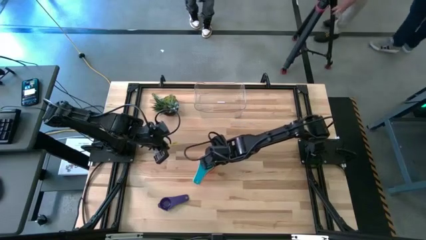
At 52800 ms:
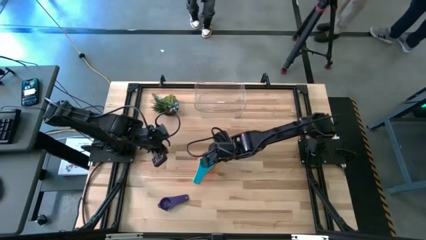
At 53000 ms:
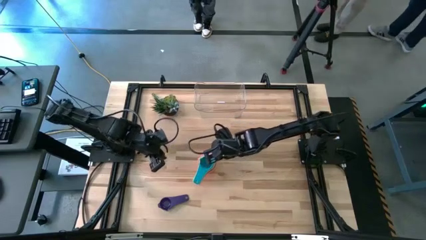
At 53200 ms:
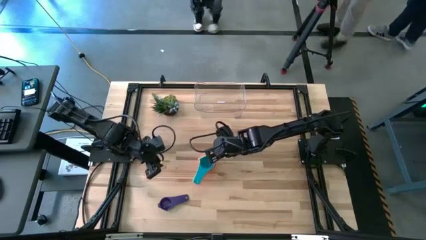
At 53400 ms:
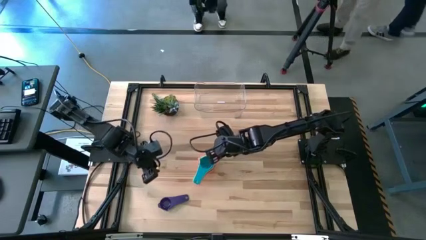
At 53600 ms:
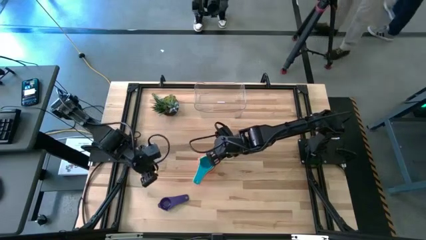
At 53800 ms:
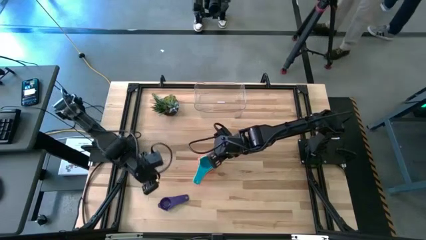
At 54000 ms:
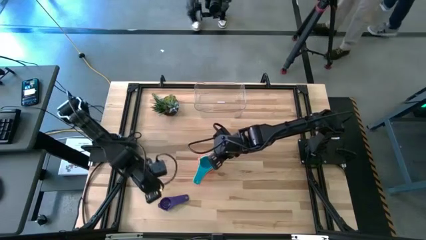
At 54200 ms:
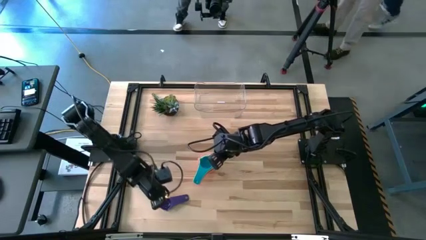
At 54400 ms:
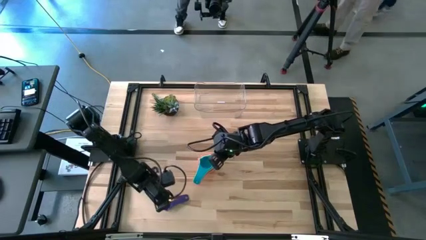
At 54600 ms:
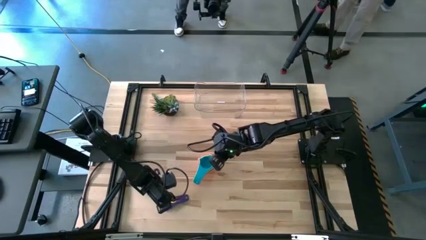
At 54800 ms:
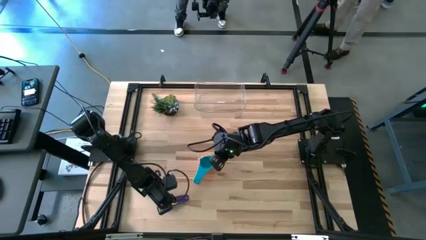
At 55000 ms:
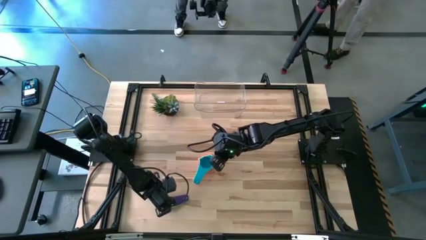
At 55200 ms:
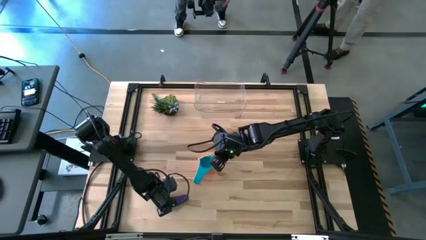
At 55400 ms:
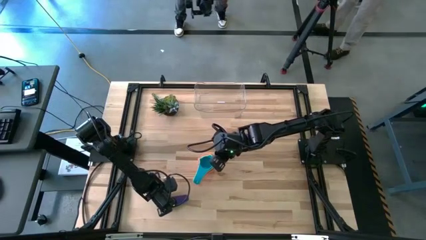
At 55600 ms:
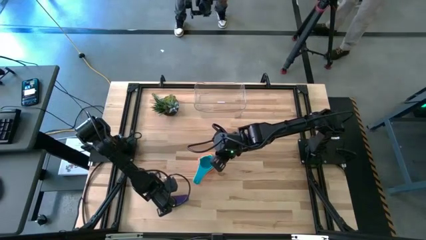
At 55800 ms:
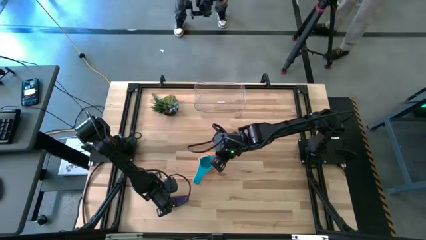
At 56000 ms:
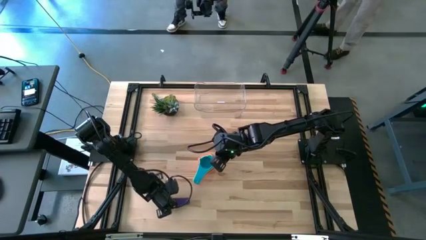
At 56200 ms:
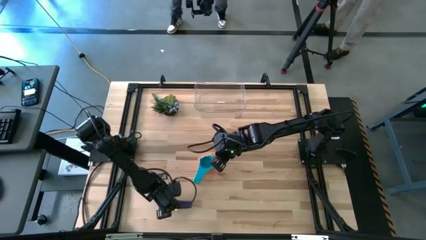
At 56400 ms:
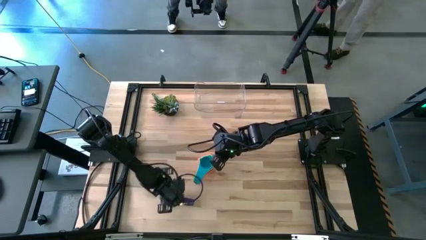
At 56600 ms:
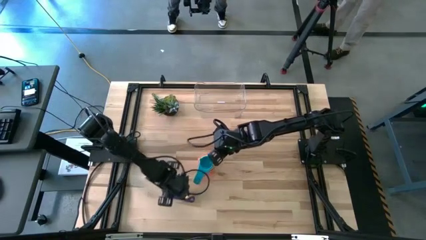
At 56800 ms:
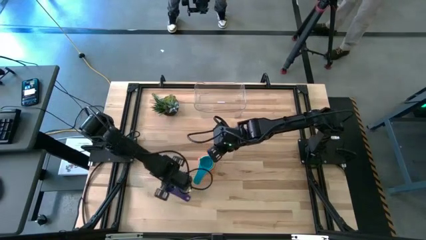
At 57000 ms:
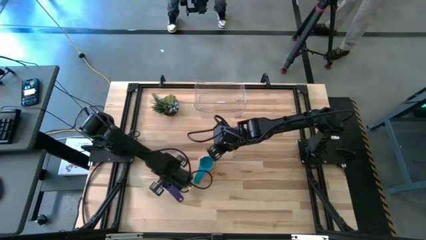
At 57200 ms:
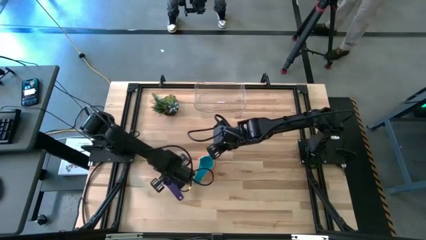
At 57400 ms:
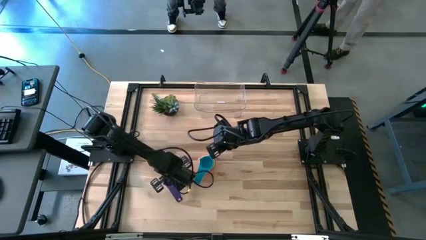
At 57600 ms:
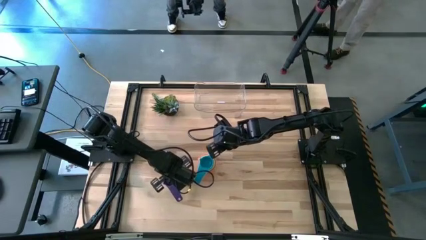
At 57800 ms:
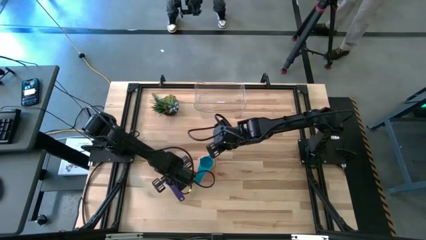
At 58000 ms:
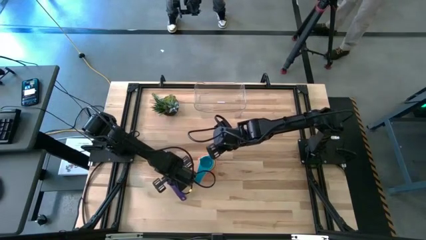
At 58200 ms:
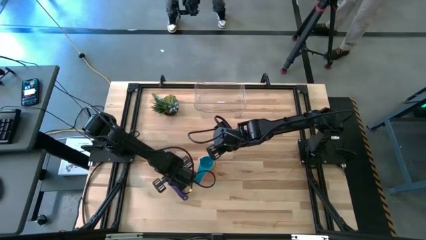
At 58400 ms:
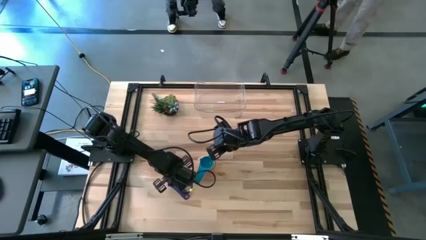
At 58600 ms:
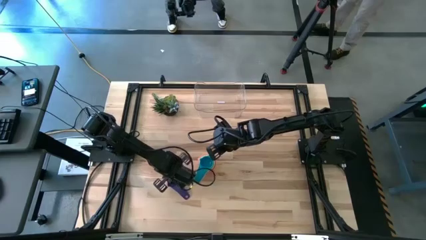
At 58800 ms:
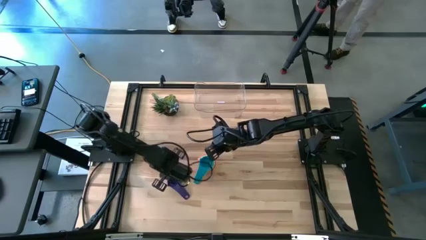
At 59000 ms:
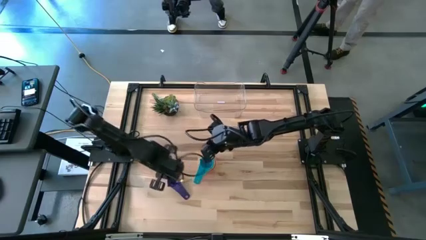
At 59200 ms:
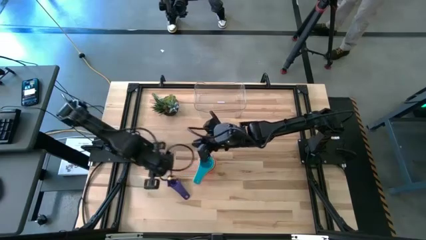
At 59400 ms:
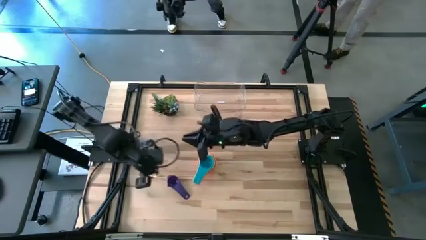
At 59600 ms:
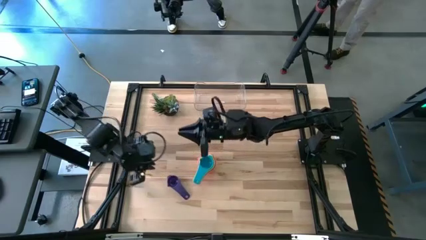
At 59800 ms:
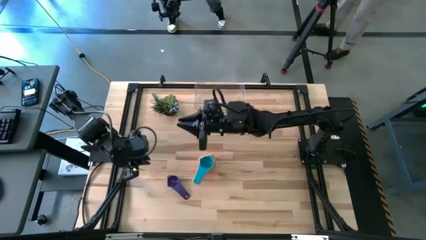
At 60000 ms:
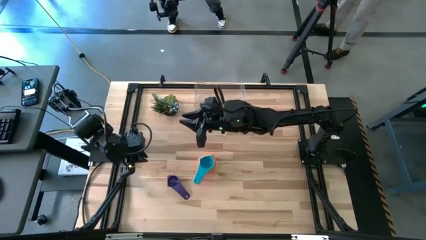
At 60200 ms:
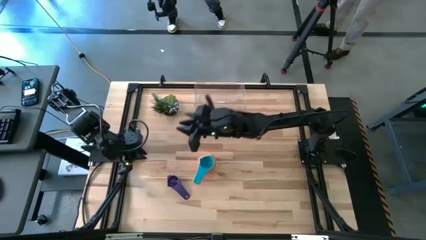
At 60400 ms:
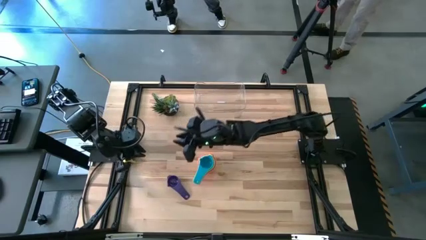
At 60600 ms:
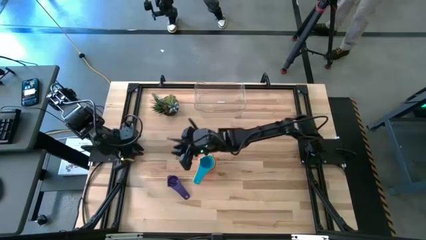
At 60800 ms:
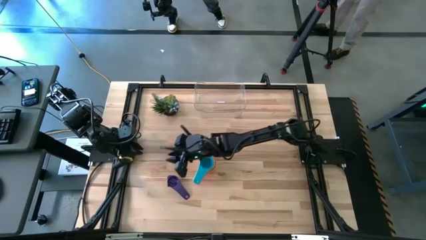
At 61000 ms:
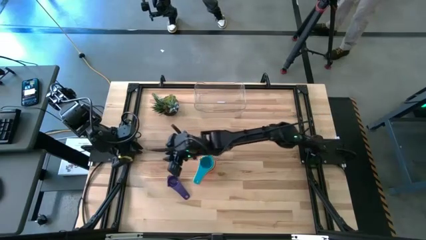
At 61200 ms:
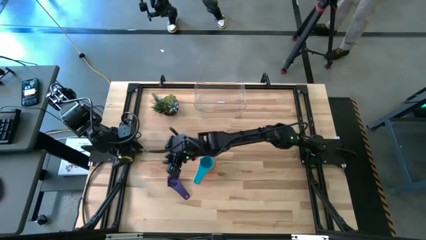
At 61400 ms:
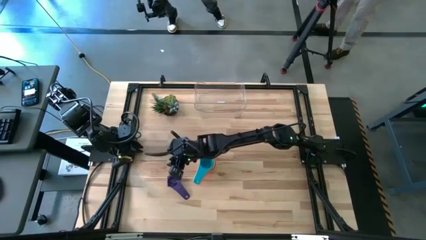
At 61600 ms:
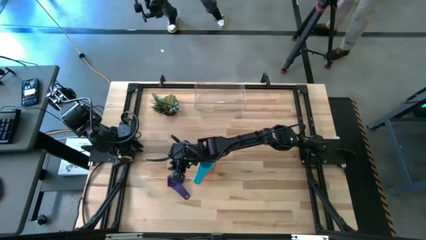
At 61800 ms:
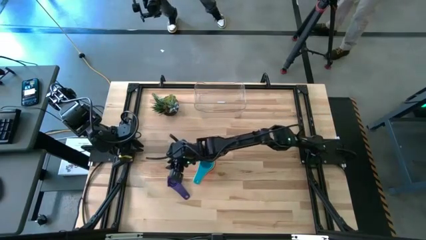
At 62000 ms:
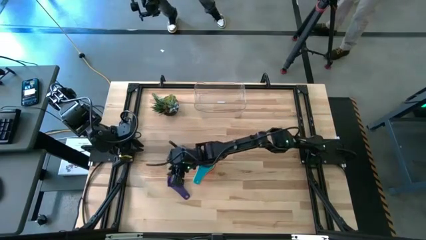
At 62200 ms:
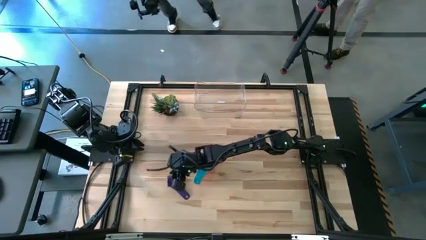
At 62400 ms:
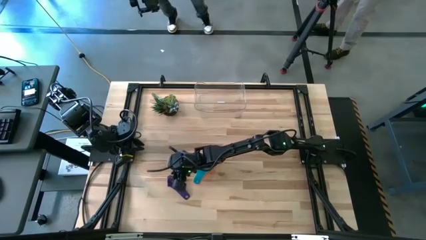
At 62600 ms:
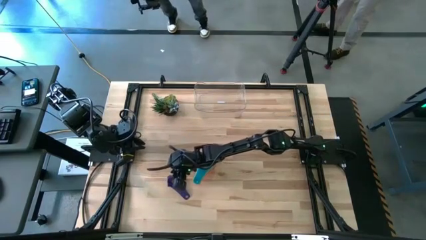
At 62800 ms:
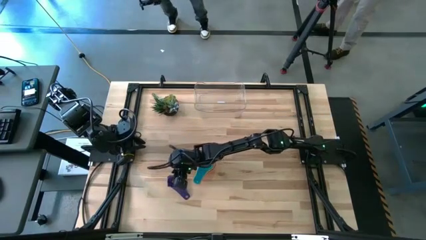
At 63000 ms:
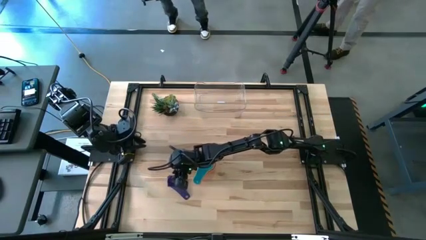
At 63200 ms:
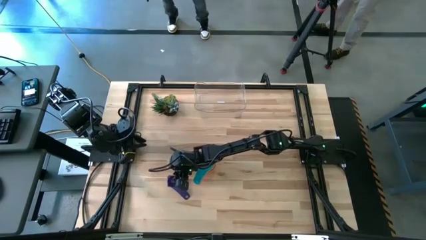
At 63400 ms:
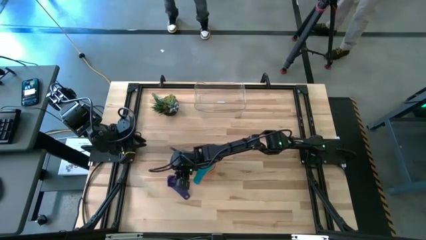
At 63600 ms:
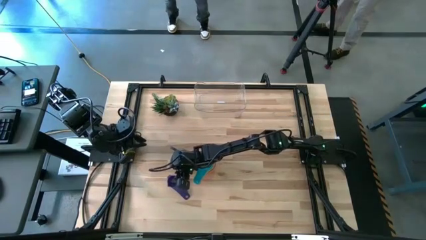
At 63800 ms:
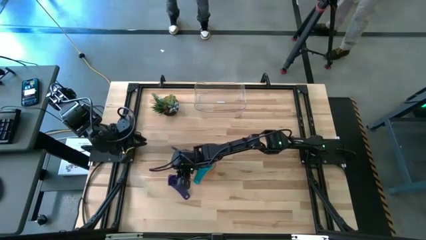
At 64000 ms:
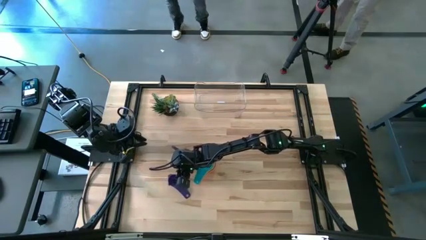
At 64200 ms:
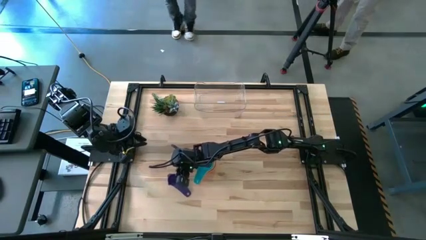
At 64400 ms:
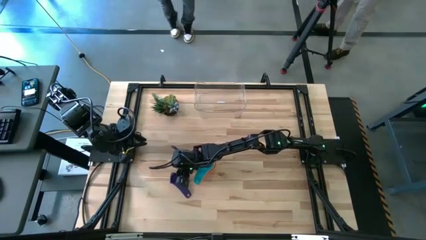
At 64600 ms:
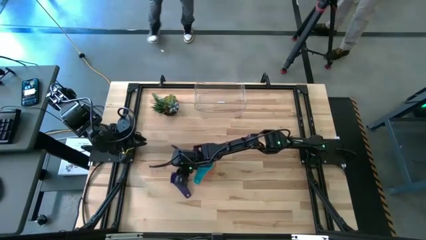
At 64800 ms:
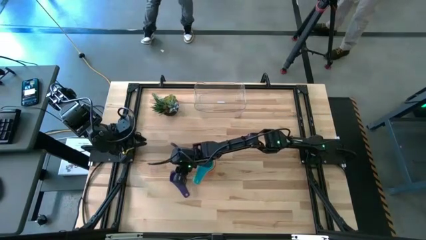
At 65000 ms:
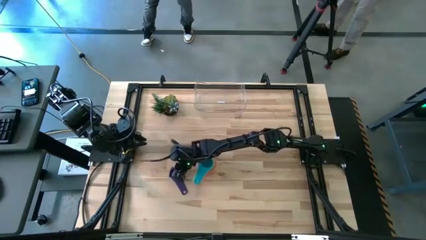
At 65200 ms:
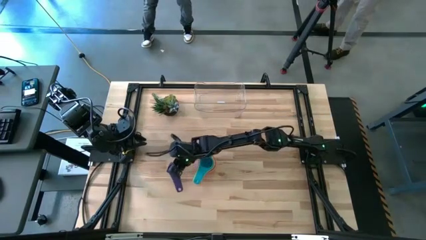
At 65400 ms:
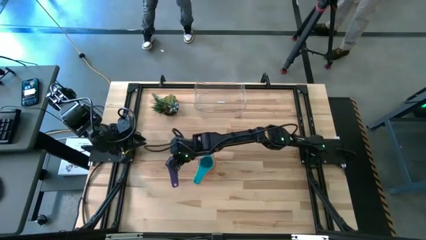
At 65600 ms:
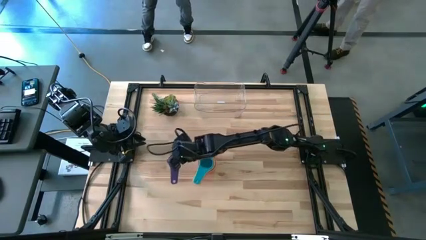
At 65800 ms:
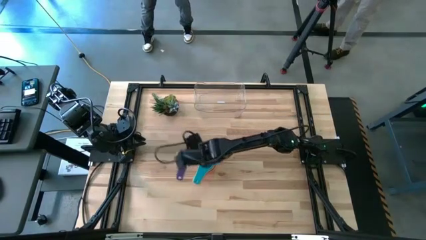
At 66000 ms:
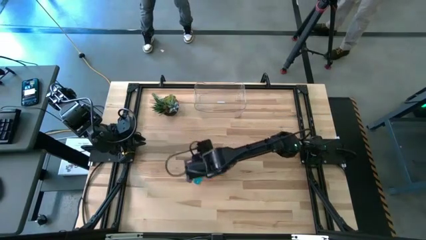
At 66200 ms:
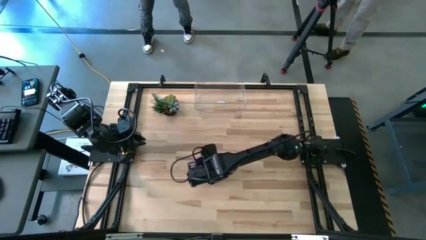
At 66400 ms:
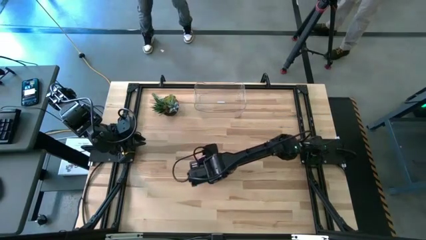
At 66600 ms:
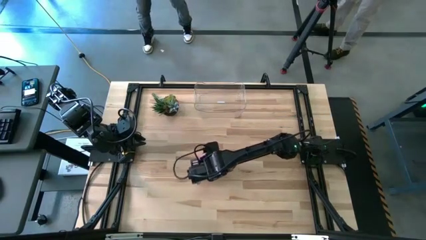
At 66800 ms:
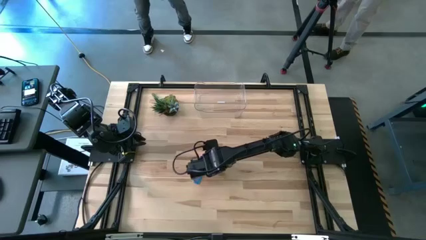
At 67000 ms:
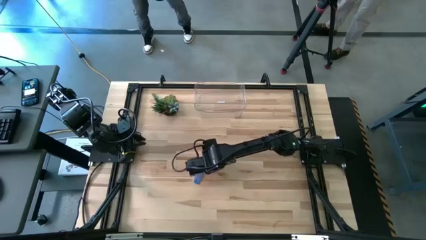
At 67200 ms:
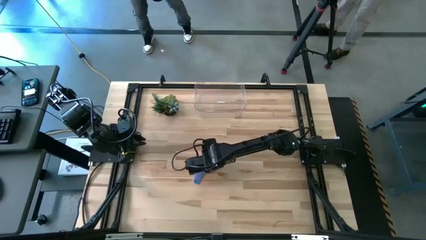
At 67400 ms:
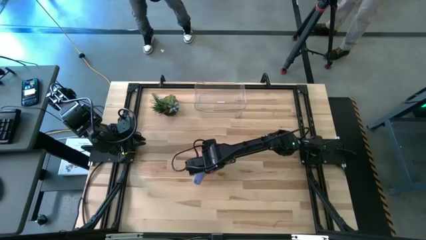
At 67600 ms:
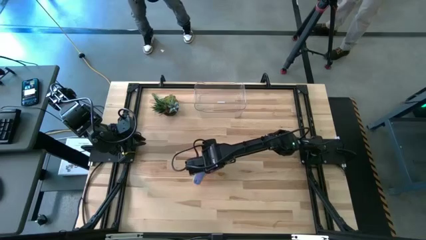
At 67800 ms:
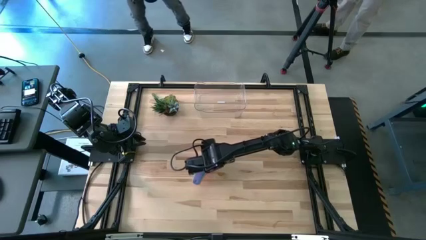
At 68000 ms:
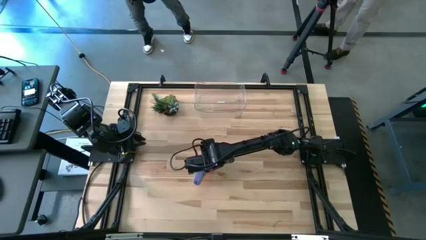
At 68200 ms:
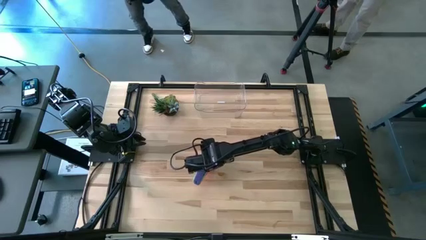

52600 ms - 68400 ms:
Task: Nest measuring cups in basket
Stack the violet measuring cup on top of the light blue measuring cup

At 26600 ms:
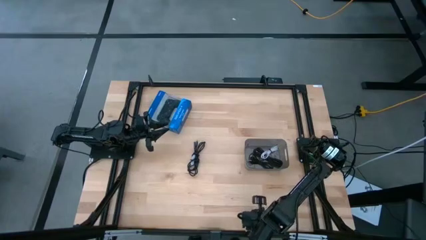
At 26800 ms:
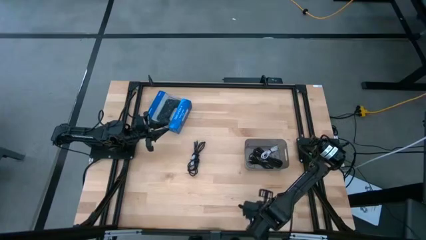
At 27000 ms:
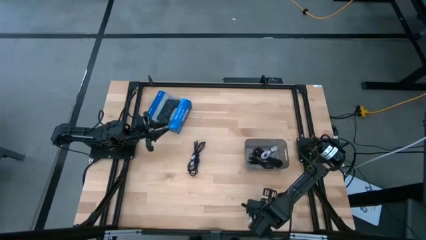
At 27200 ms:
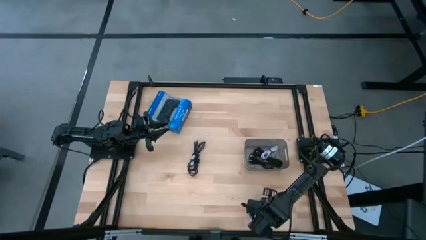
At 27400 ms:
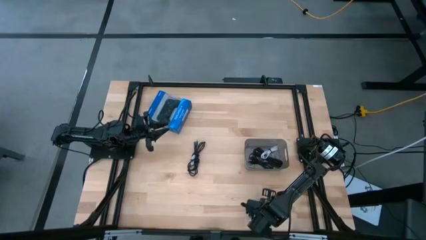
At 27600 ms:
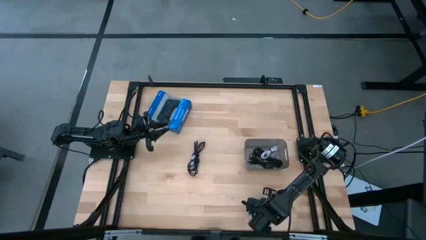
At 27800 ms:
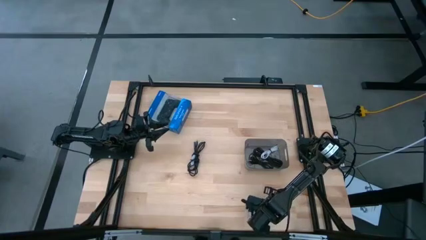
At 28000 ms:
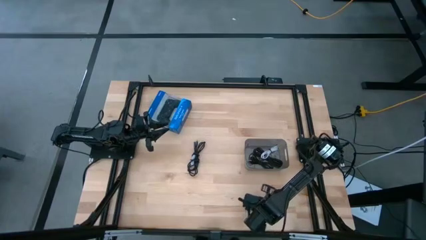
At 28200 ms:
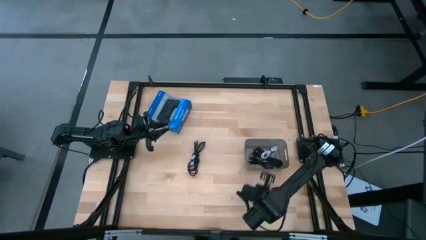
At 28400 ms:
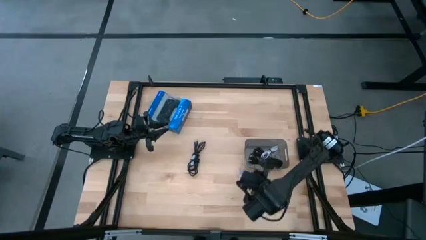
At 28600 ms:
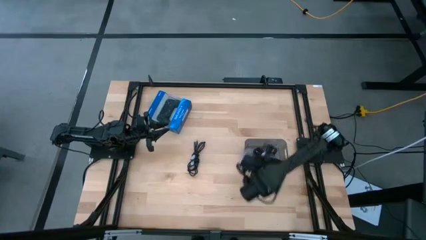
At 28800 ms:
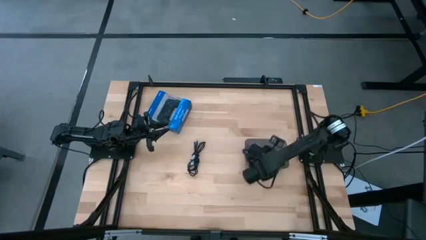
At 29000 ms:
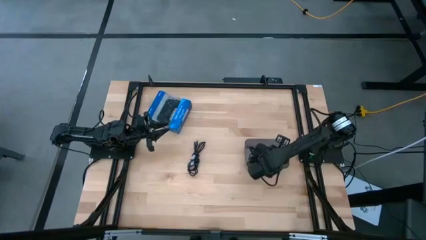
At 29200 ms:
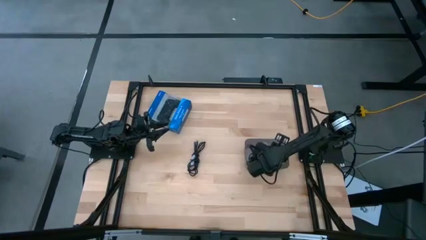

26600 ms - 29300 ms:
Task: Pick and place USB-C Cables
Put the light purple charger cable into the black bin
